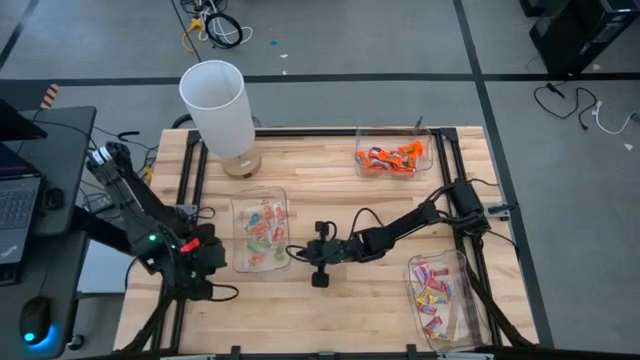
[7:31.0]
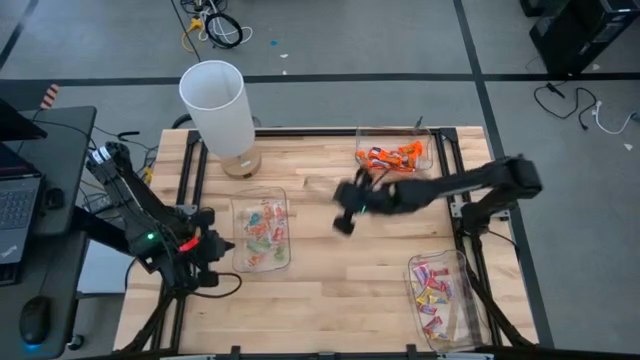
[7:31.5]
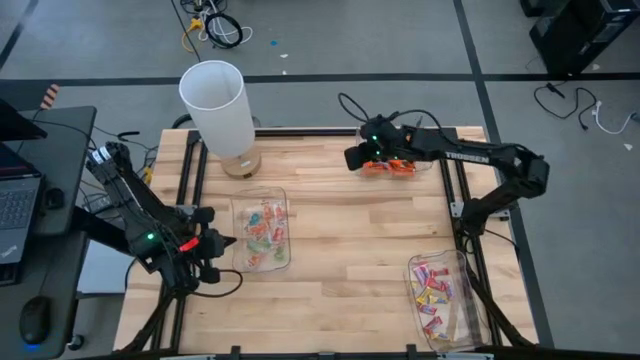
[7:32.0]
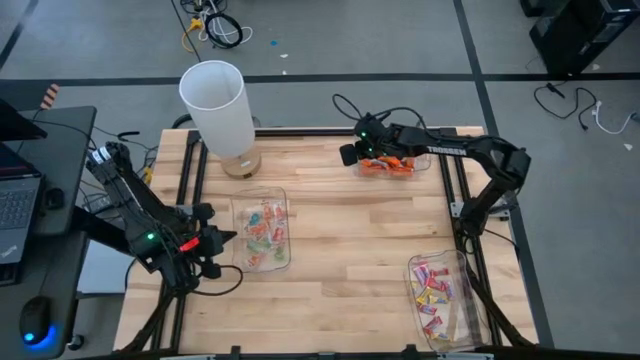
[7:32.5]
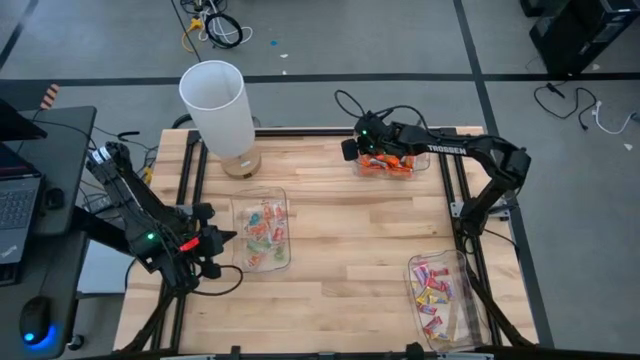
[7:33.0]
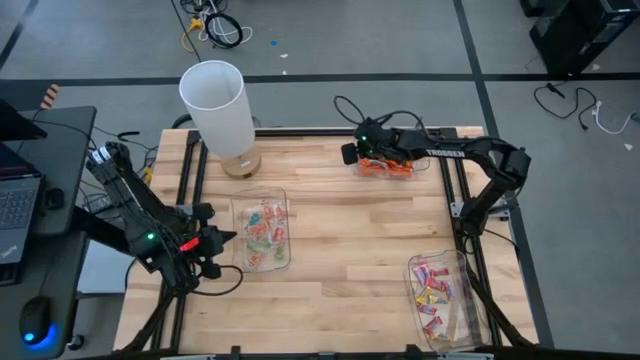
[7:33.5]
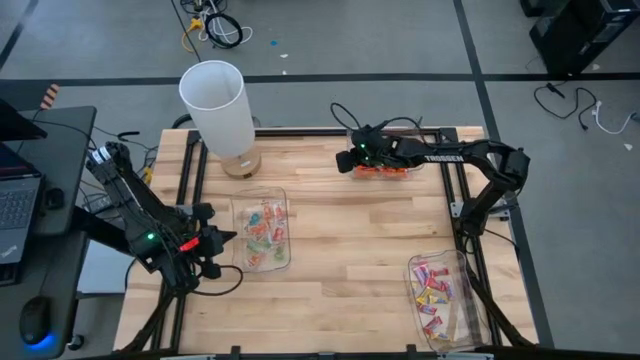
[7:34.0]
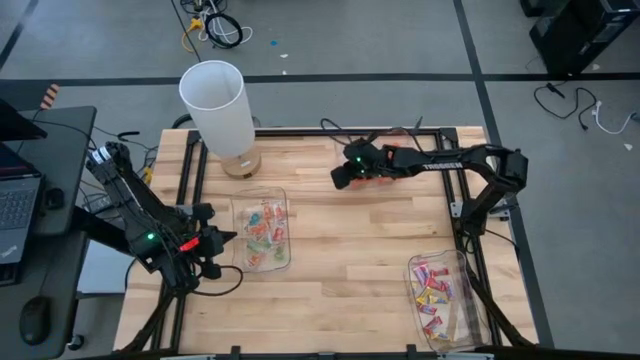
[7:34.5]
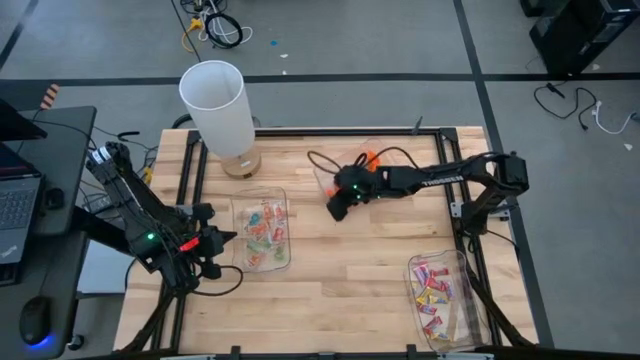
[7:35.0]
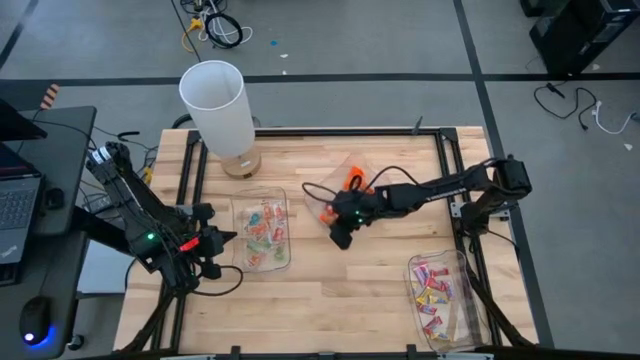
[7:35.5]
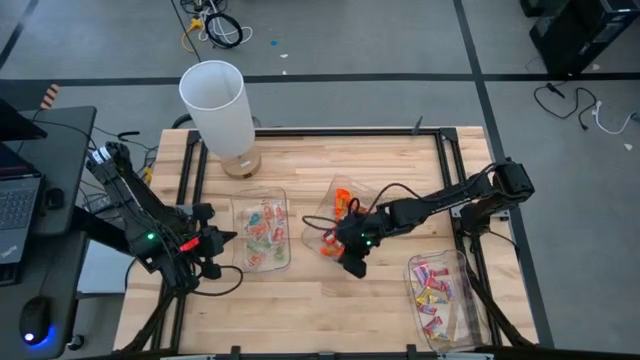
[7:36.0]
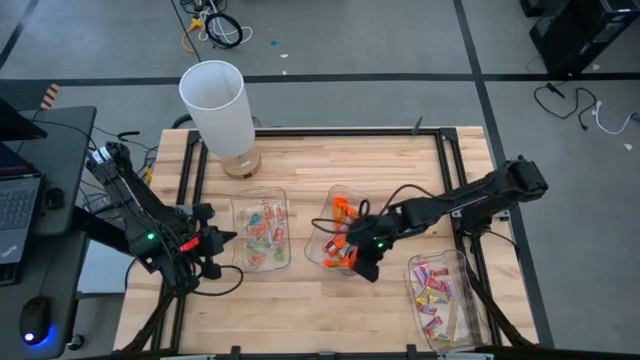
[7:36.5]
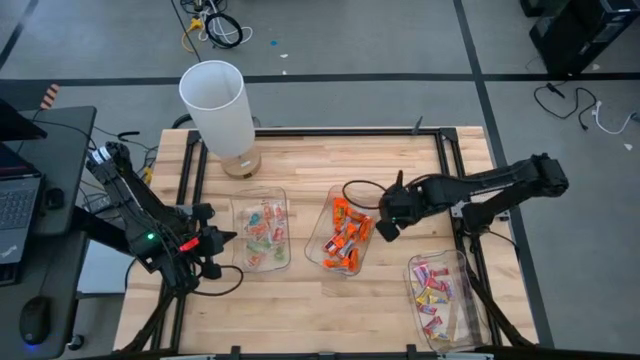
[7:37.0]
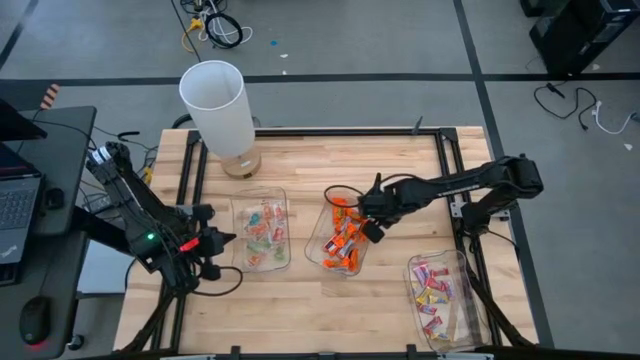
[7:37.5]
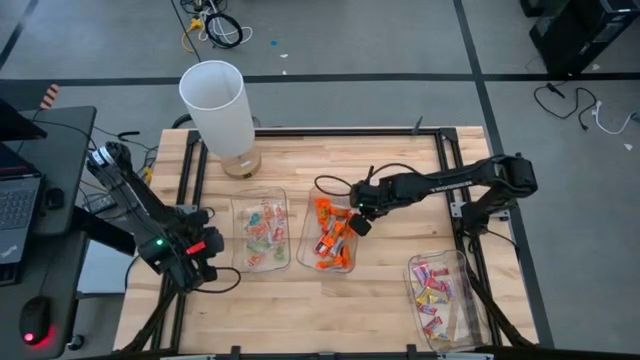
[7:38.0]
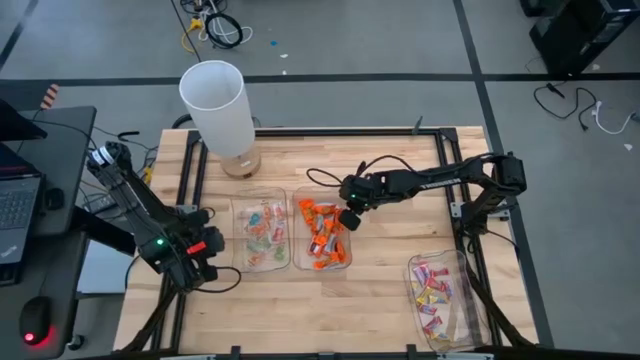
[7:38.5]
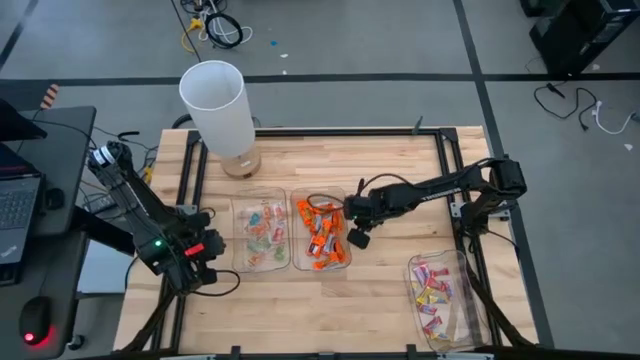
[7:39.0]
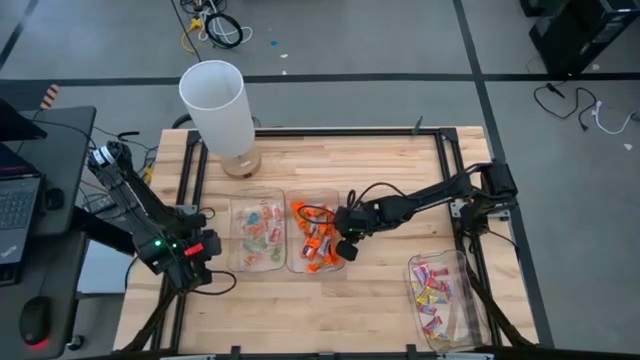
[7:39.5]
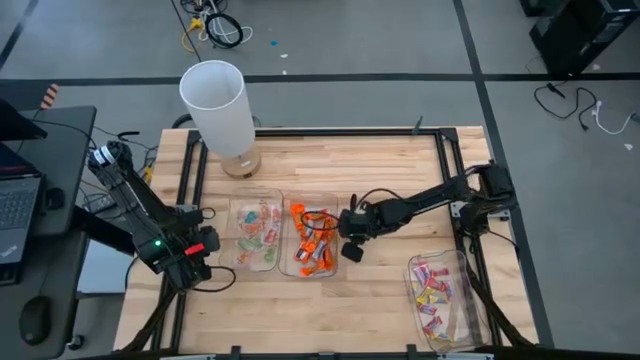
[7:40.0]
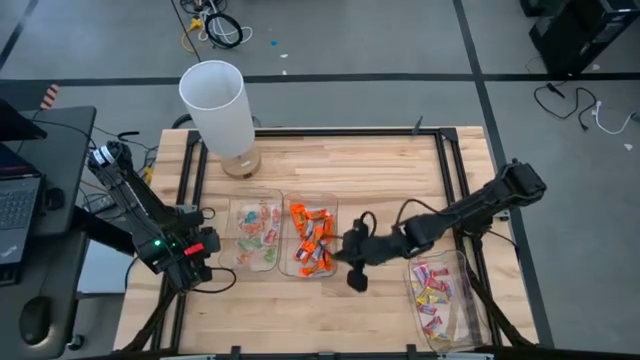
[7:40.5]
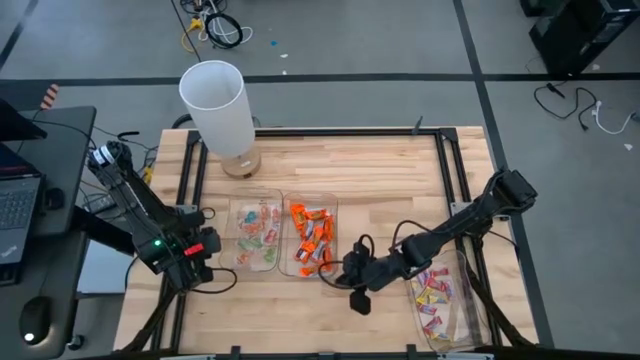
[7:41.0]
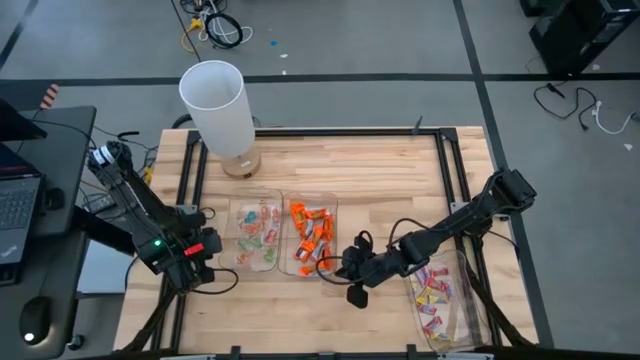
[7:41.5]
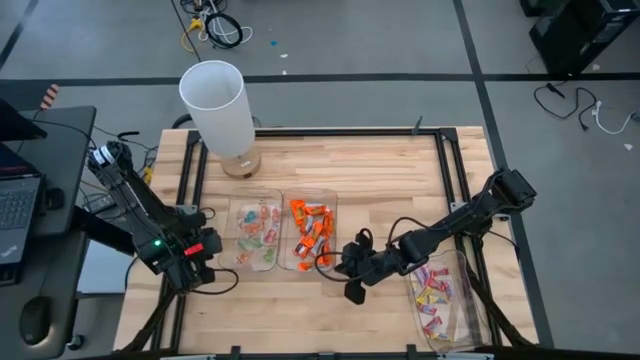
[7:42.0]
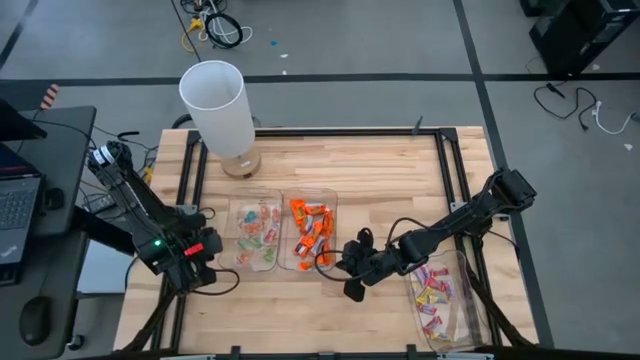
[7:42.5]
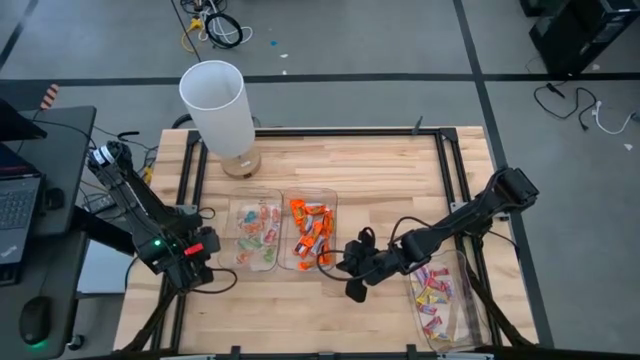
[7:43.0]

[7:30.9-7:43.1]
Task: Sort candy
Move the top right transparent bin to the center of the table

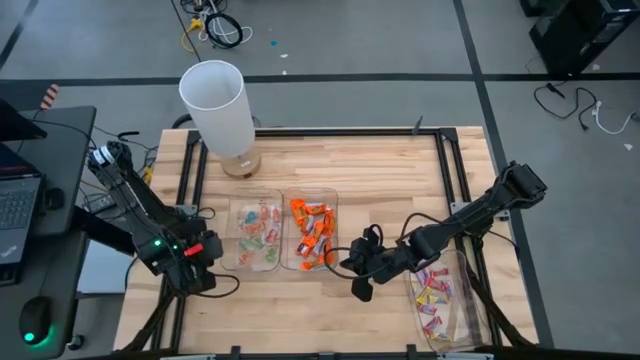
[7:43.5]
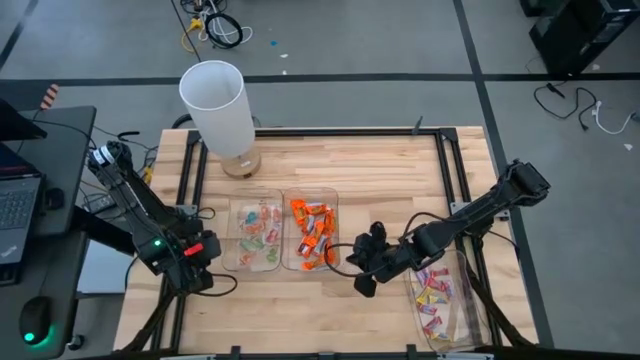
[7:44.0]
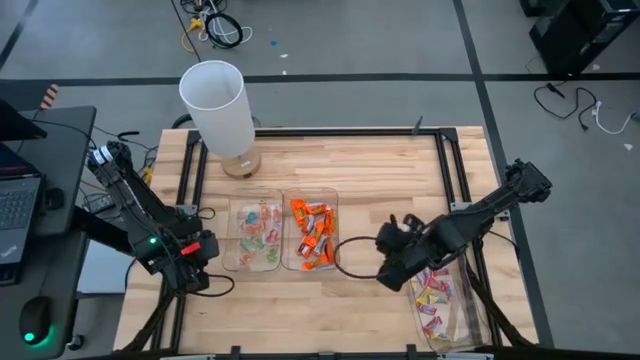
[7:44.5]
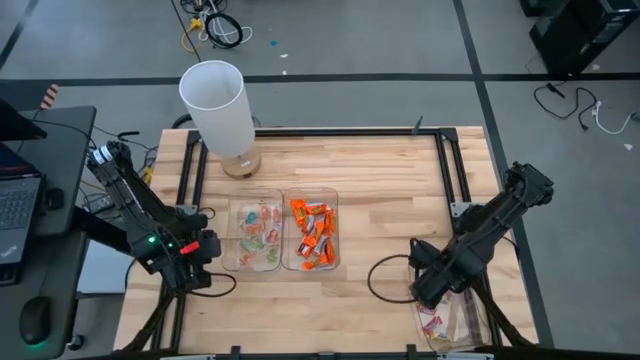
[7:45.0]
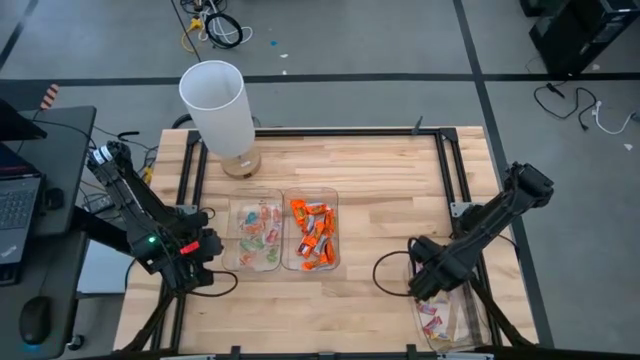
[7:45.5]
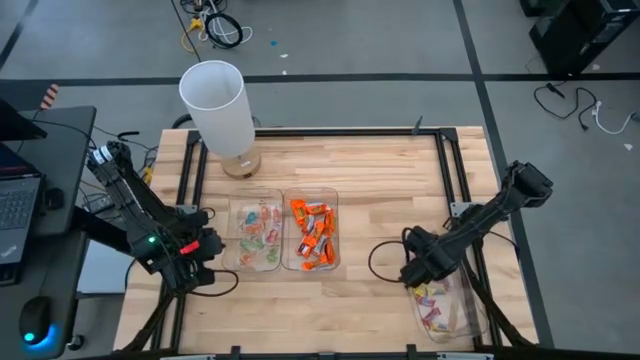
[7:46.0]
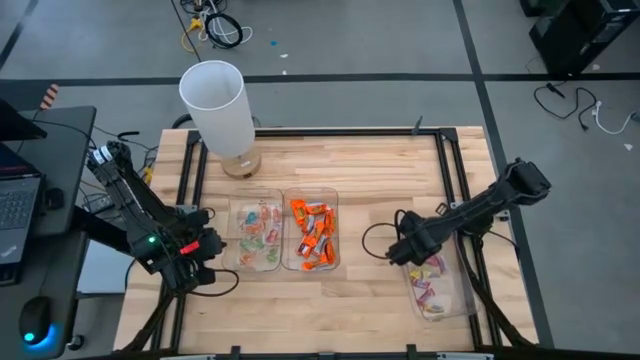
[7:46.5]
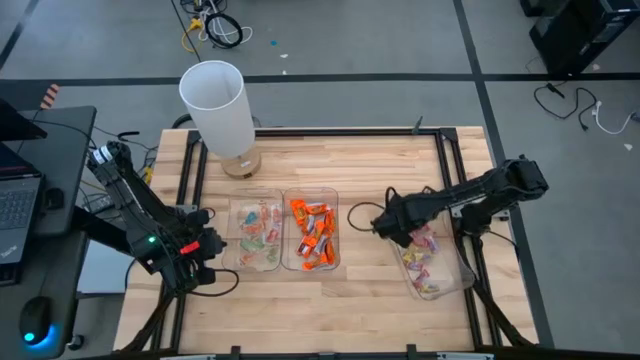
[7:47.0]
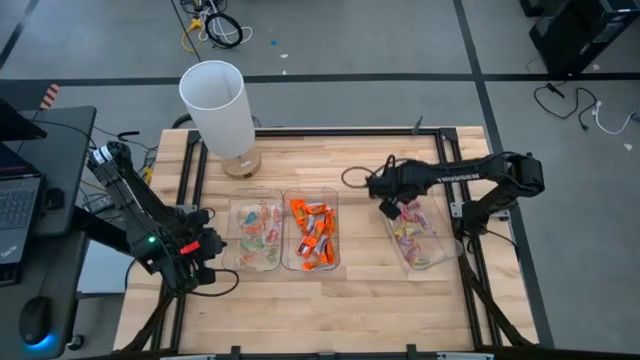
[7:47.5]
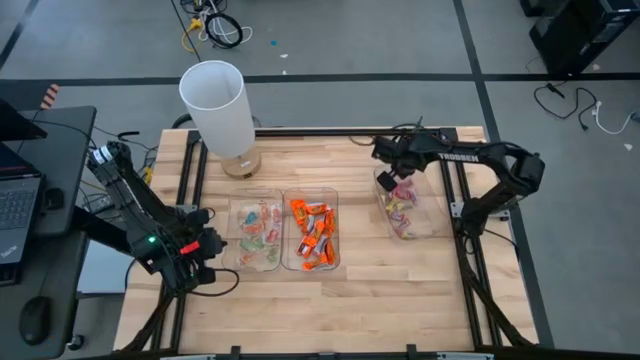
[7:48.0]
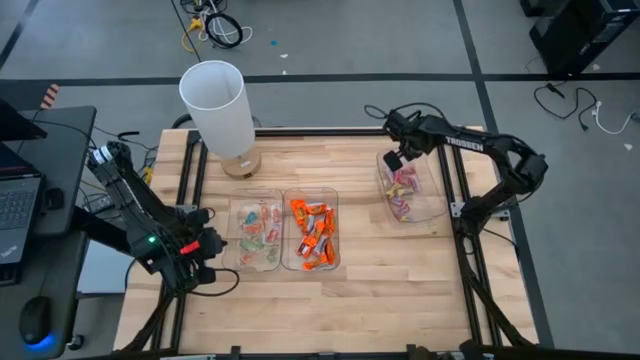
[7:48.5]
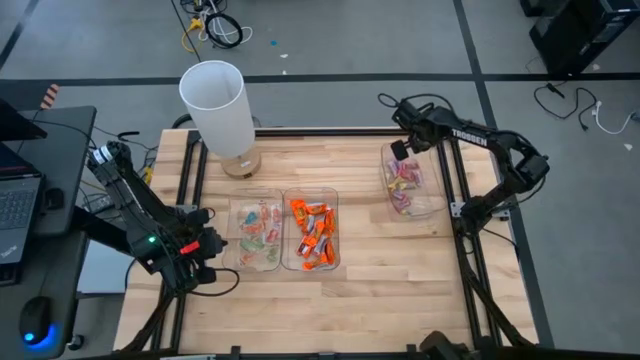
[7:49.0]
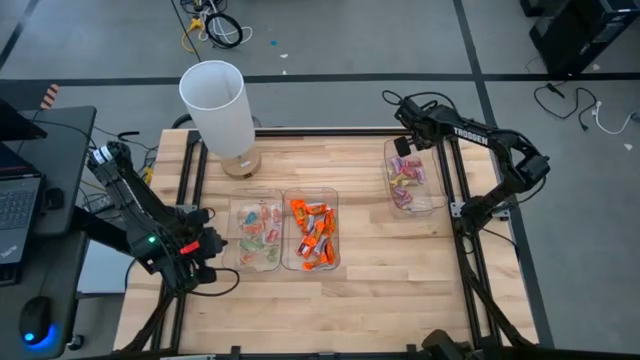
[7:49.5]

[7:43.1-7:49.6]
Move the bottom right transparent bin to the top right of the table

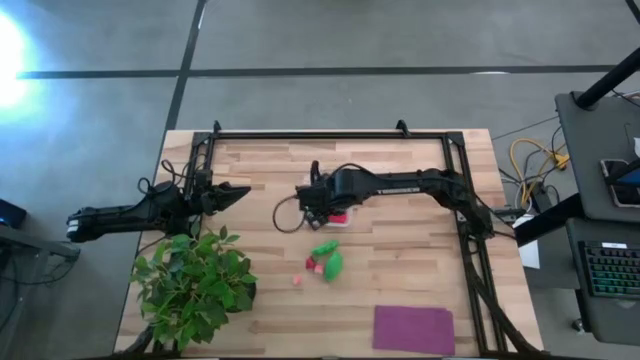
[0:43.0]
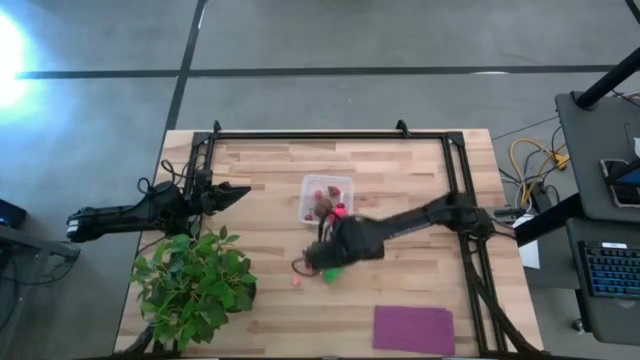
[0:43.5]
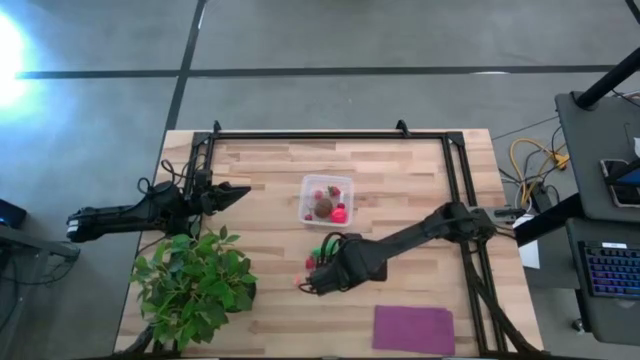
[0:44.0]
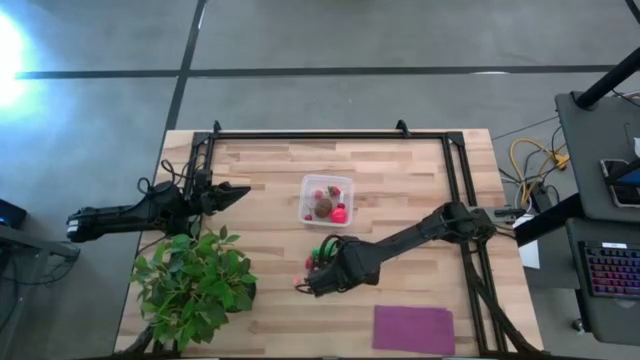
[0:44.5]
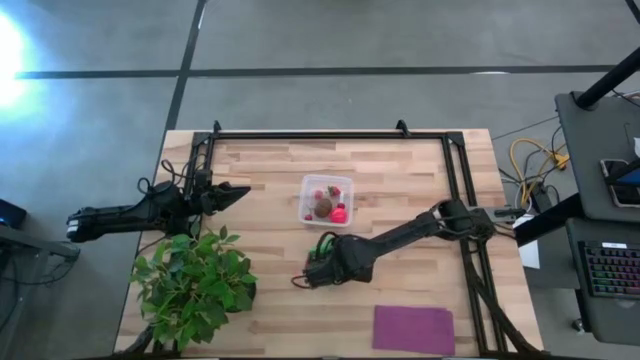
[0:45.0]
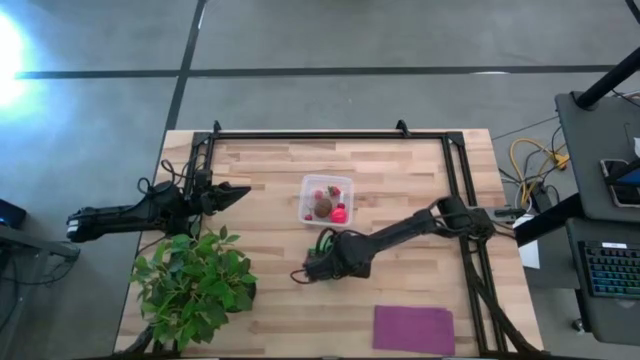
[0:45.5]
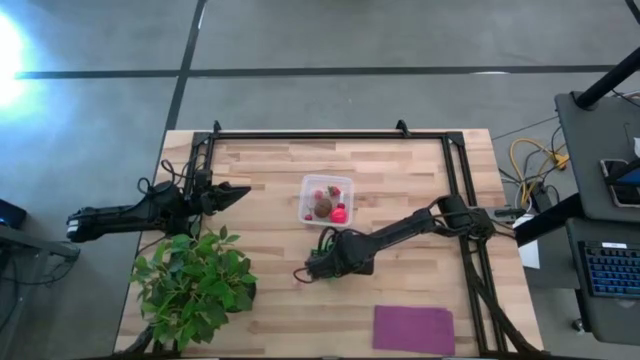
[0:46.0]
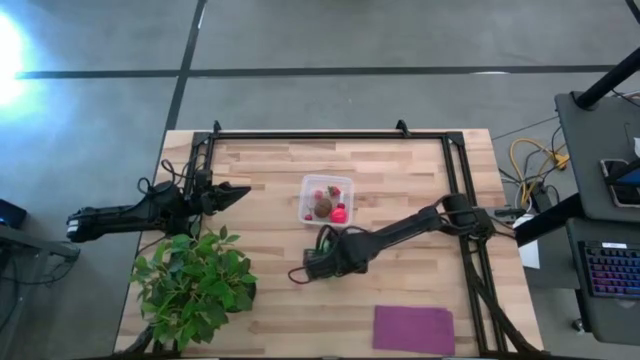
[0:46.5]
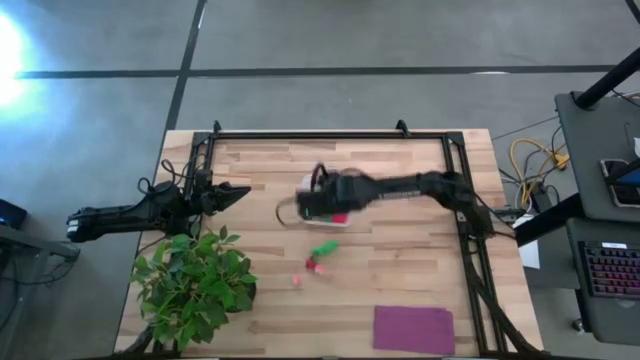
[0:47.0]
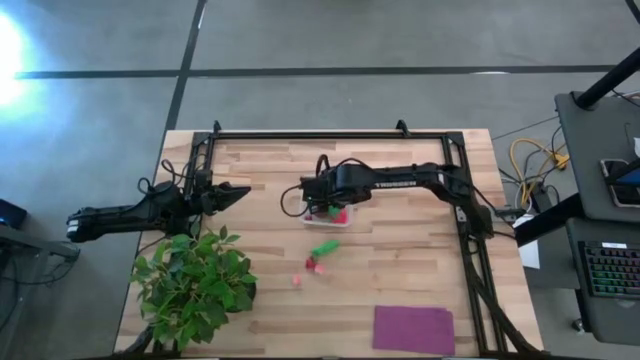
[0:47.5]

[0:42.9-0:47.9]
Task: Pick and placing Produce into tupperware
Put the green corn into the transparent bin
